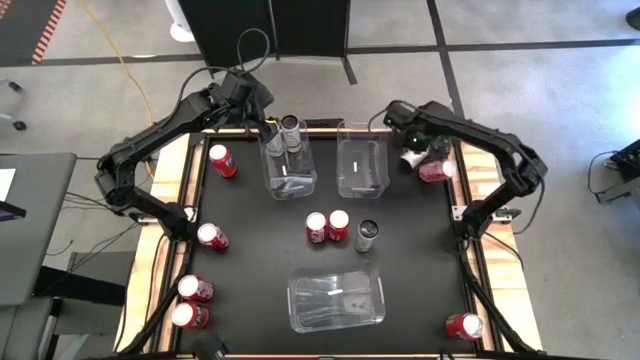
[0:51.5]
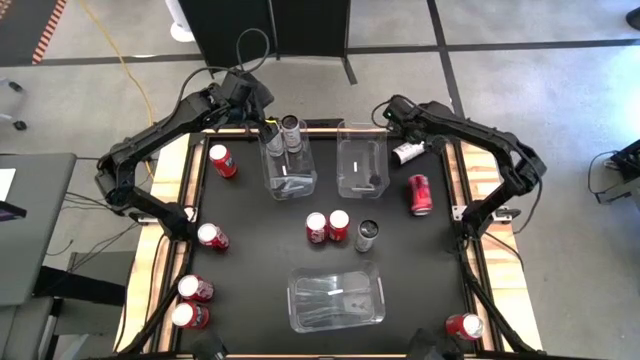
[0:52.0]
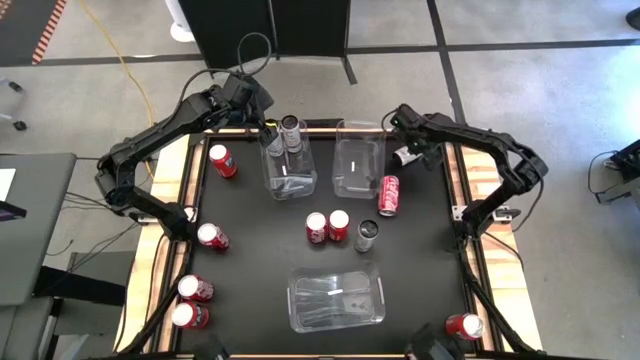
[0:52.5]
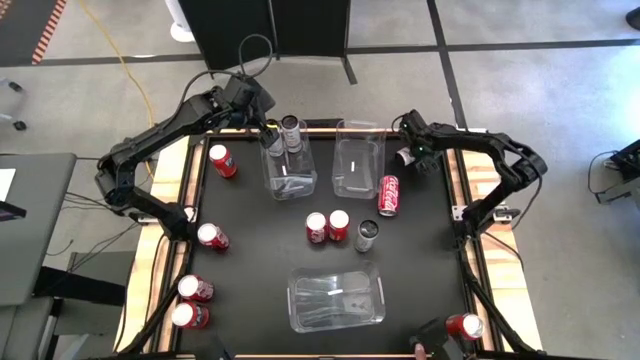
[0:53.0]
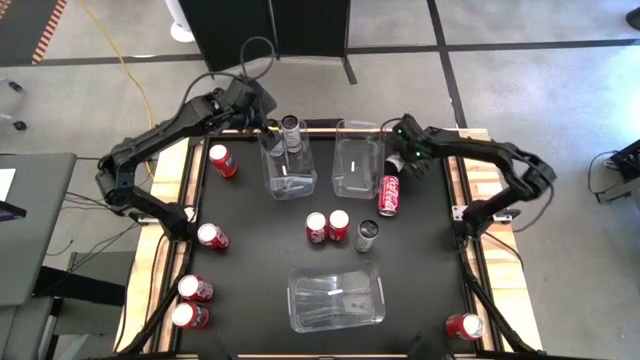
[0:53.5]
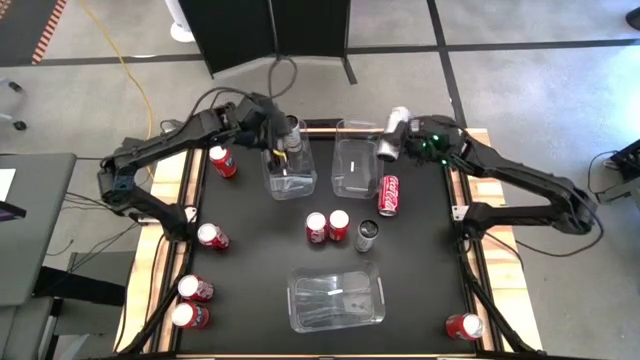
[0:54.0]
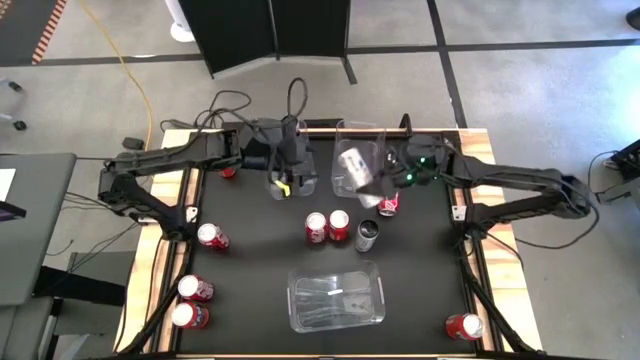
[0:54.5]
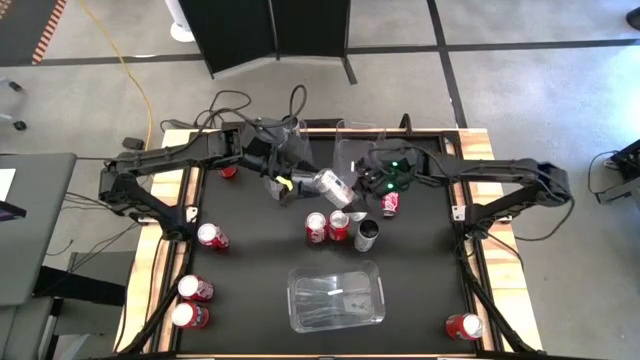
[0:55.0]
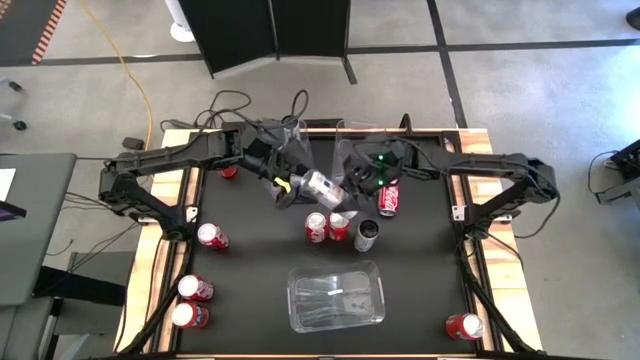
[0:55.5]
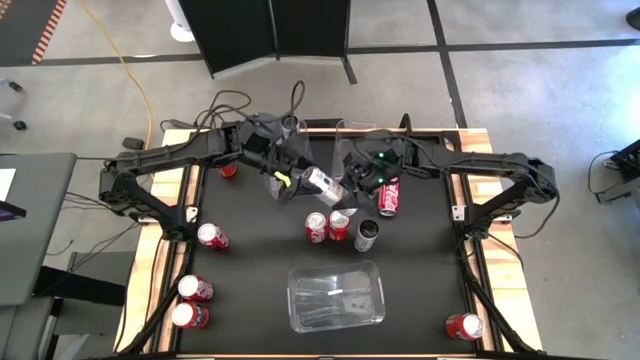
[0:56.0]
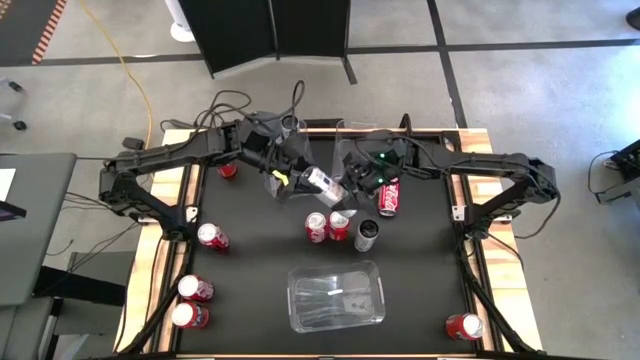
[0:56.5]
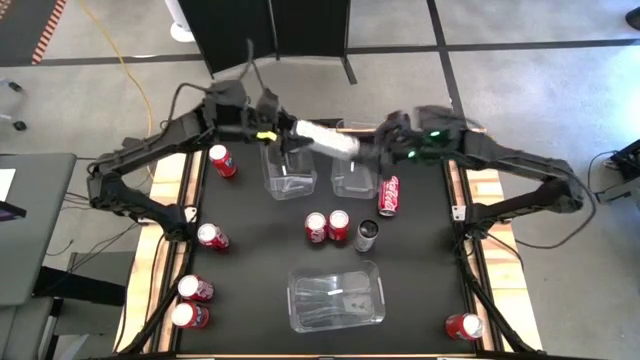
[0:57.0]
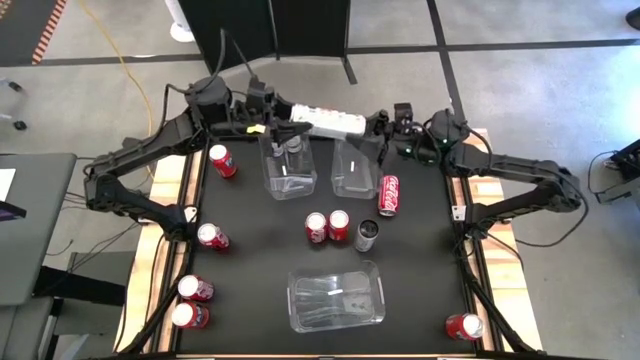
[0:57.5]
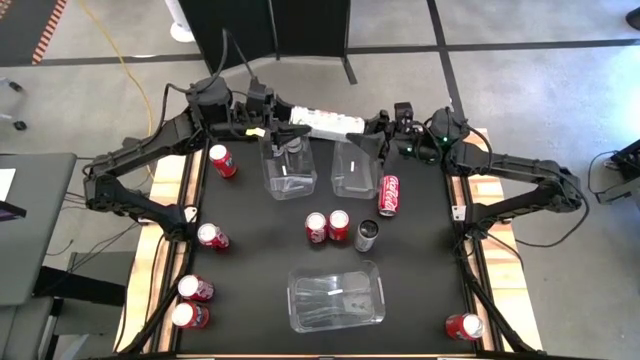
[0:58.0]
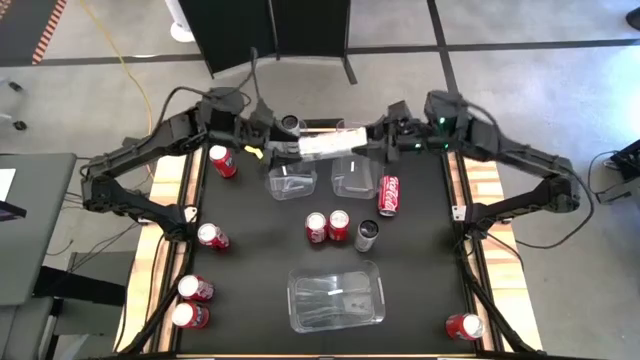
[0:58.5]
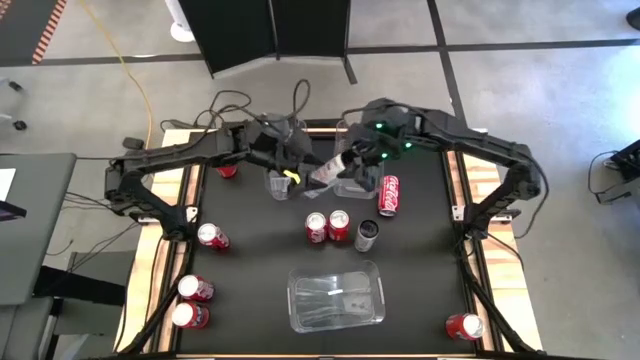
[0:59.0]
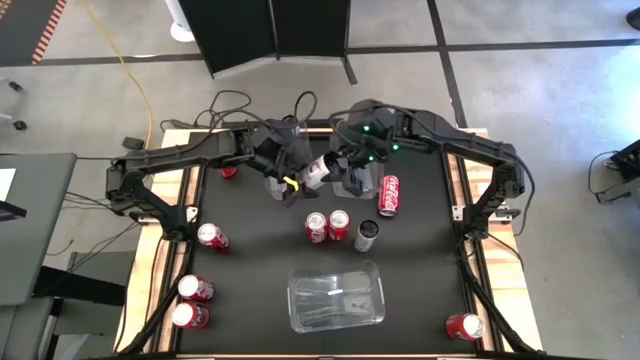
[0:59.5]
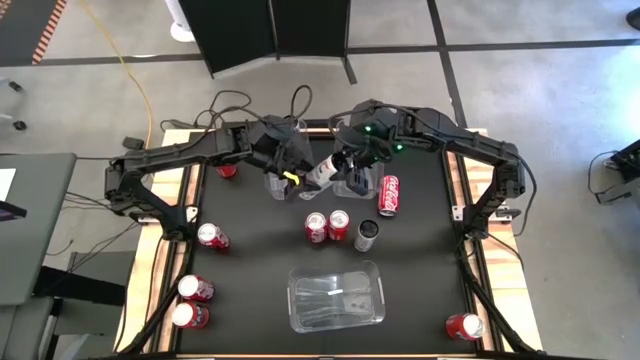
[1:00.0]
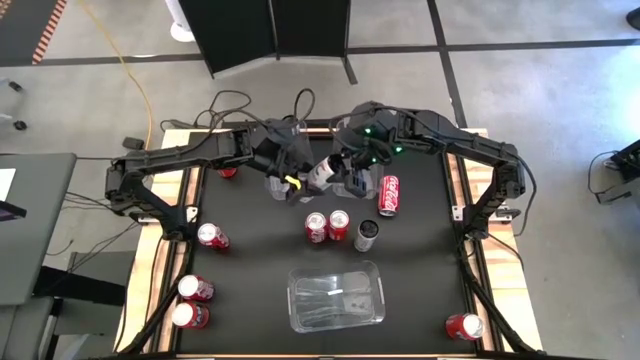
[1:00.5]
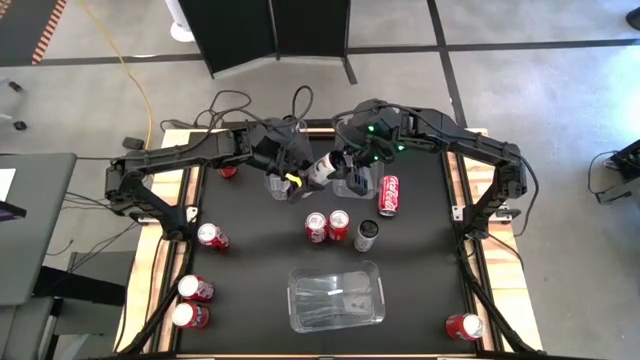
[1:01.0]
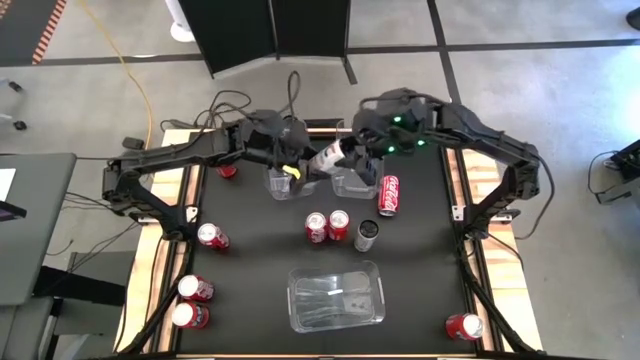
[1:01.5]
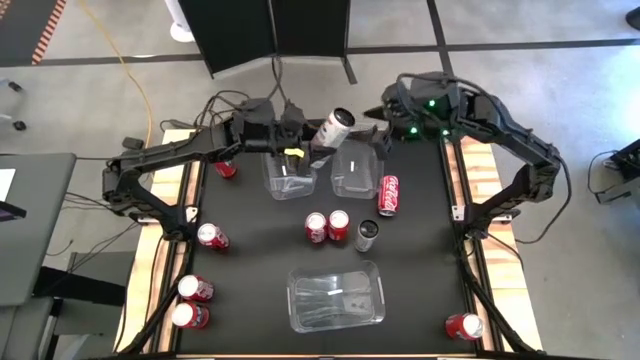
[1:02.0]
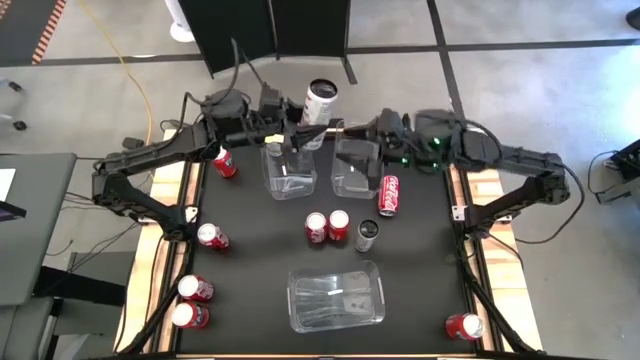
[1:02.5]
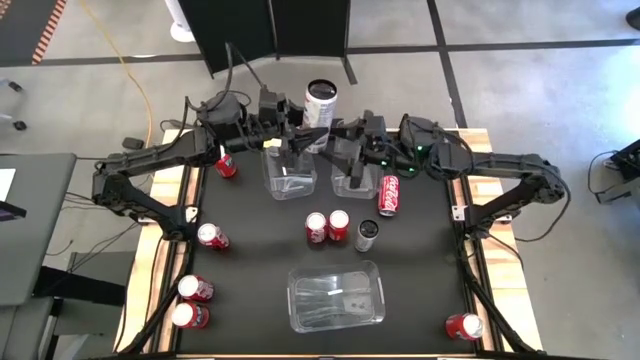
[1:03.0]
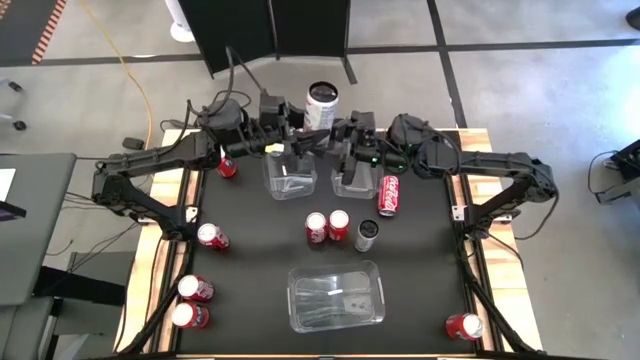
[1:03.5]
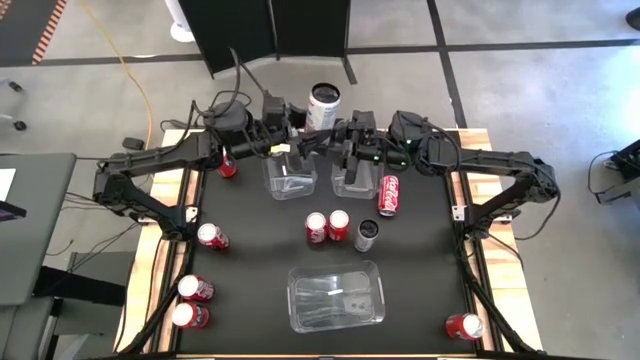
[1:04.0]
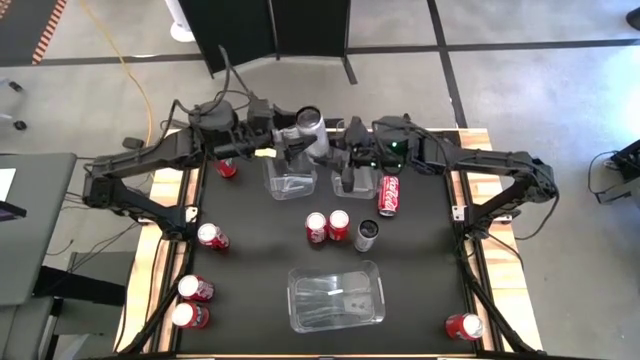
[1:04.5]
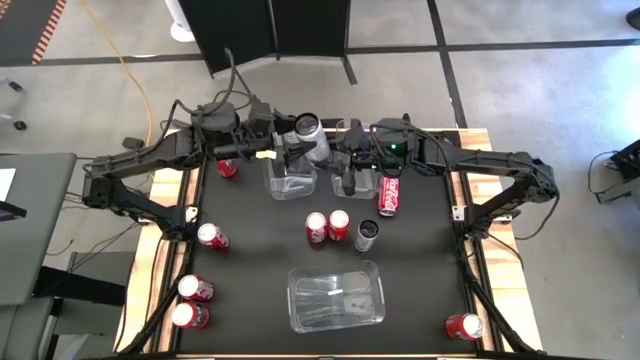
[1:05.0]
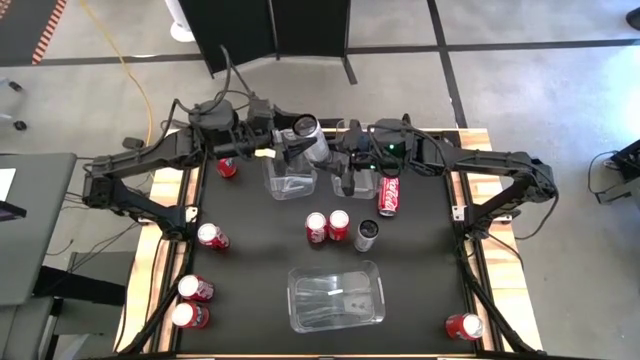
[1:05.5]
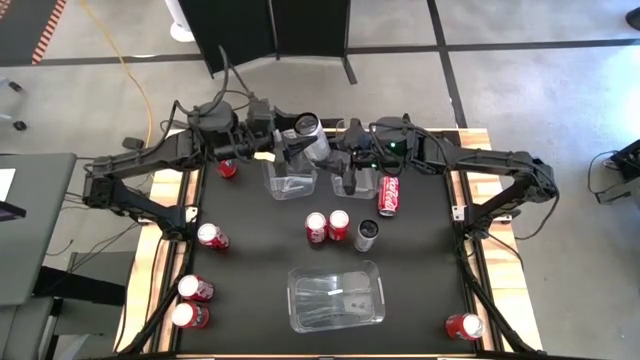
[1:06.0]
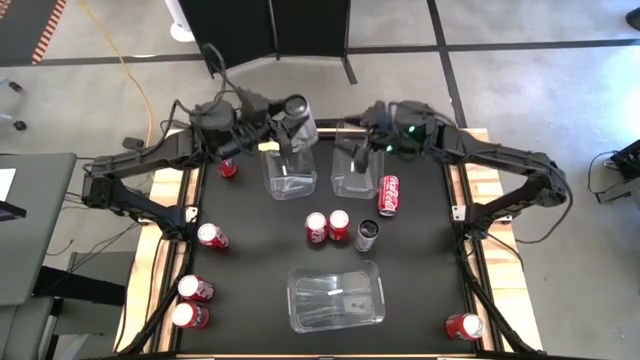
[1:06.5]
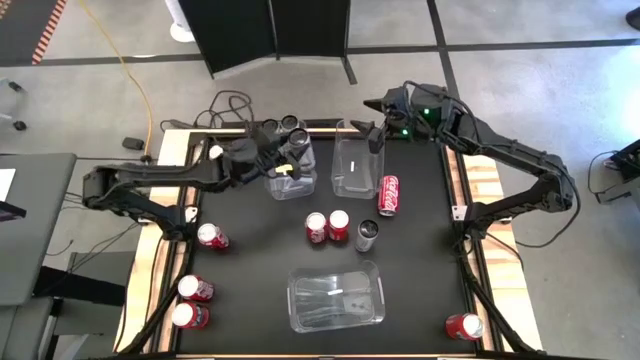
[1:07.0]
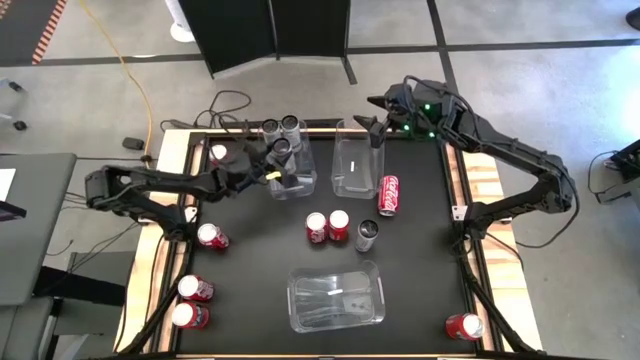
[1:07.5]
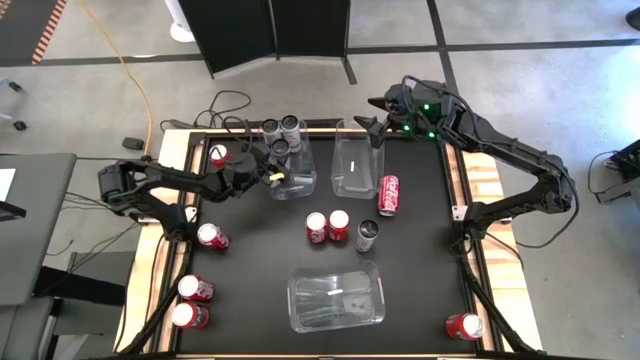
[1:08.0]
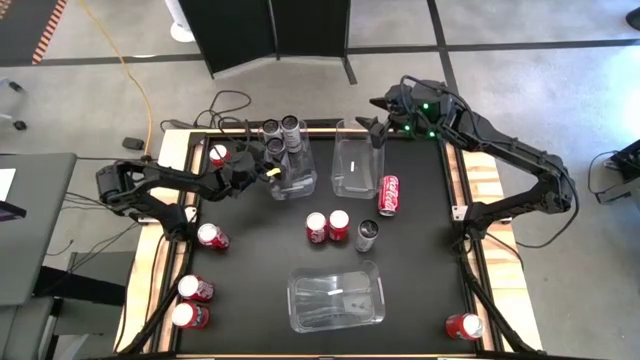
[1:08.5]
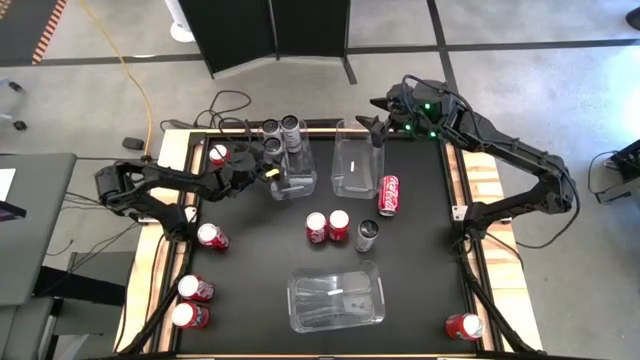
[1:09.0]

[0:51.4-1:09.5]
Task: Sort soda cans
Put the top white soda can into the left transparent bin

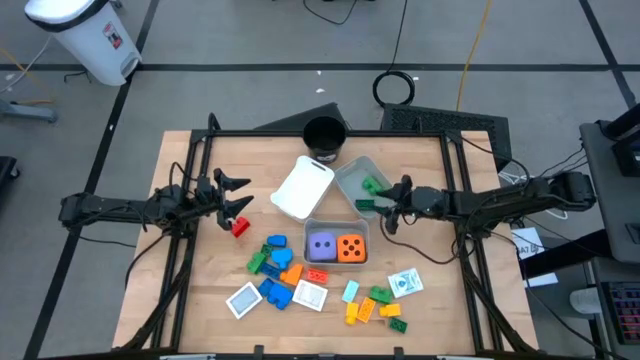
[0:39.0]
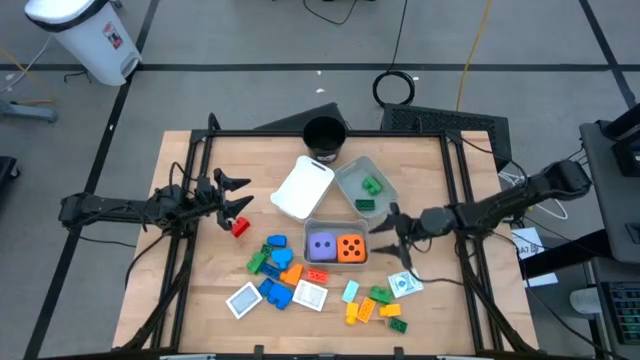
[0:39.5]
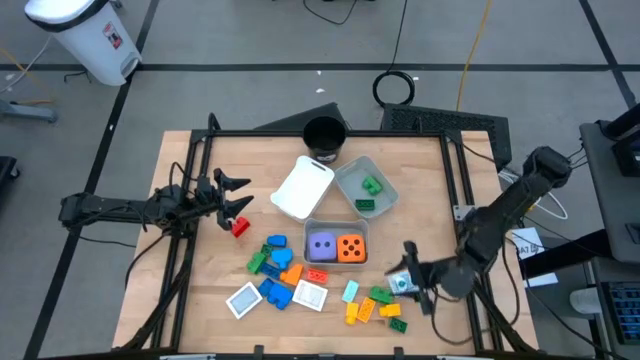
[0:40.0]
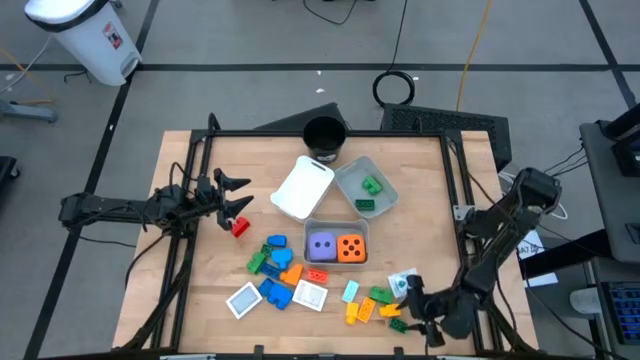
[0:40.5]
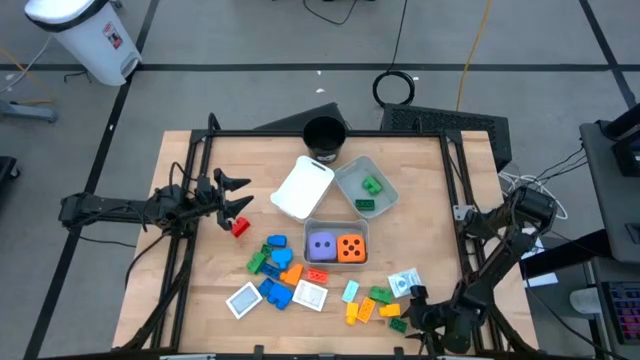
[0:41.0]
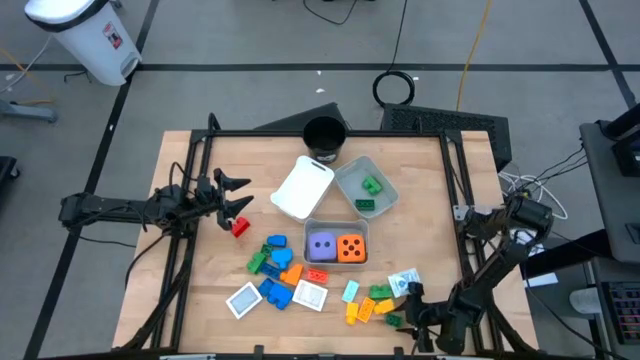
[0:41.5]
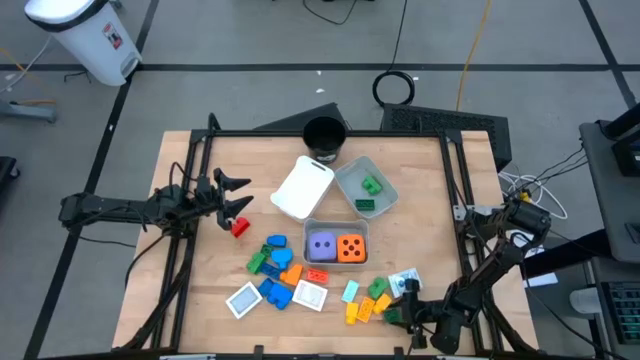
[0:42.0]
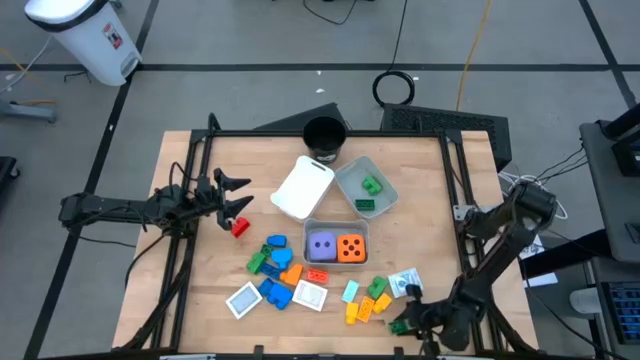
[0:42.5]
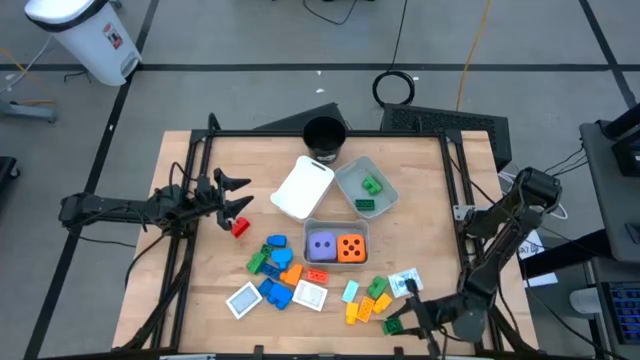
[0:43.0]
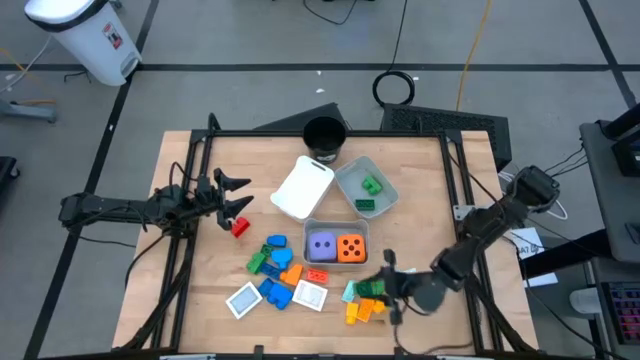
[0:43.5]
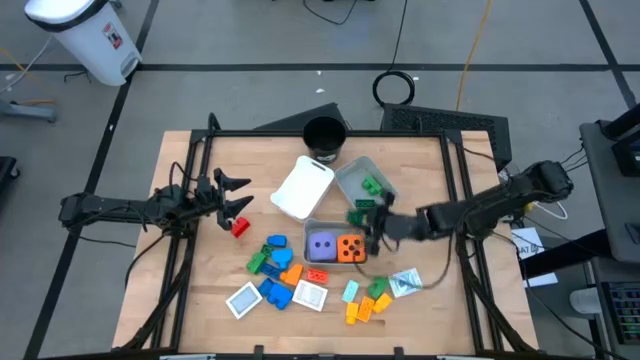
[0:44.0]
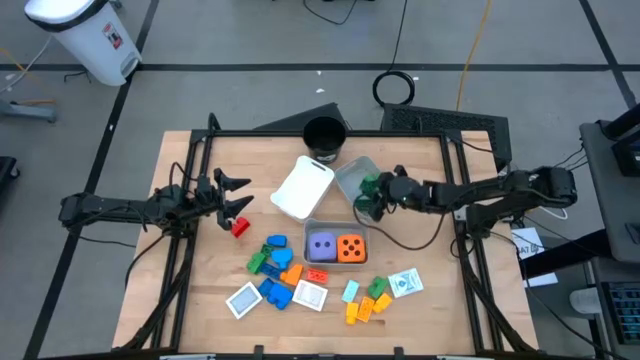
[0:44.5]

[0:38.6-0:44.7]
Task: Pick & Place Toys
Put the green game piece into the top gray bin
